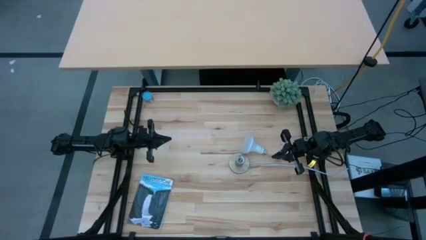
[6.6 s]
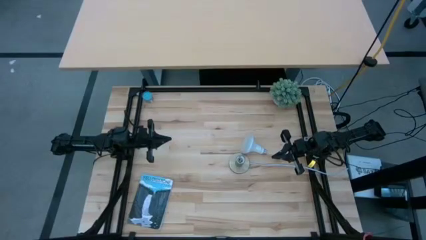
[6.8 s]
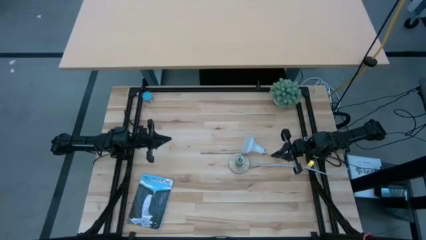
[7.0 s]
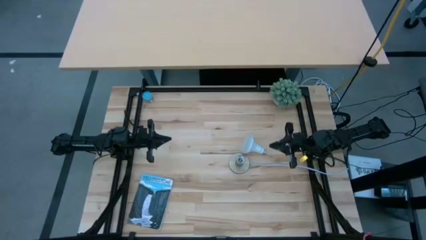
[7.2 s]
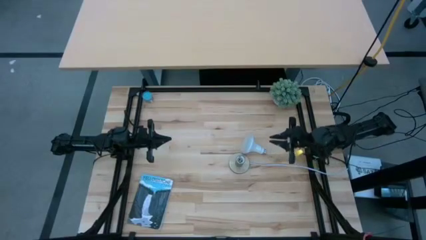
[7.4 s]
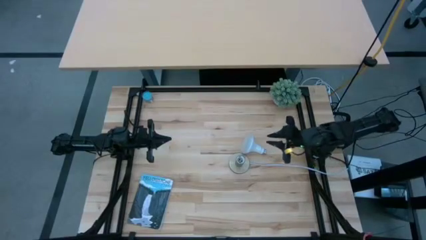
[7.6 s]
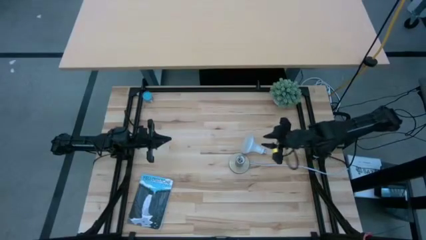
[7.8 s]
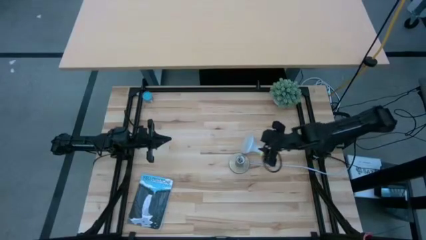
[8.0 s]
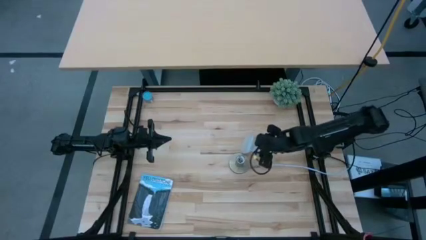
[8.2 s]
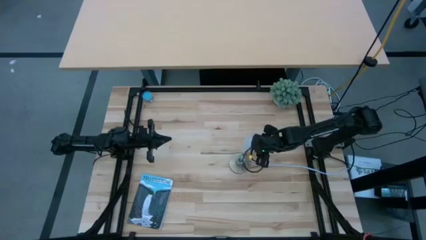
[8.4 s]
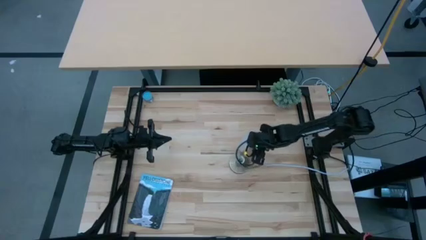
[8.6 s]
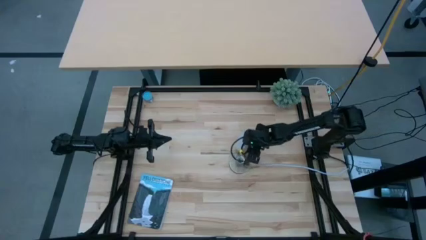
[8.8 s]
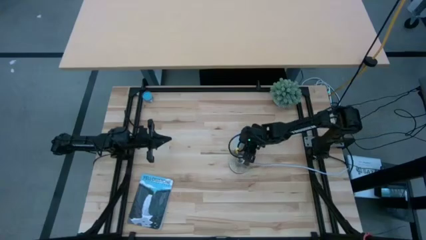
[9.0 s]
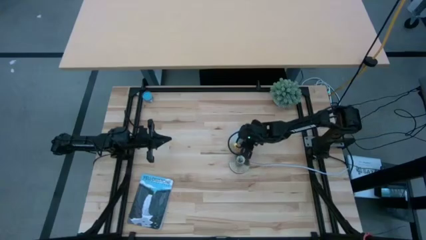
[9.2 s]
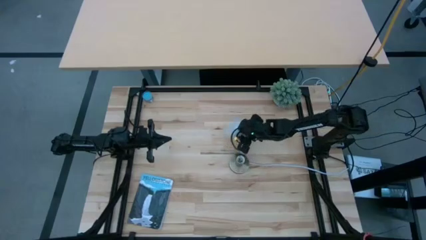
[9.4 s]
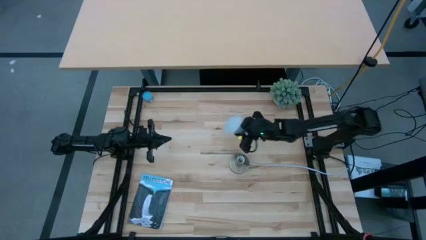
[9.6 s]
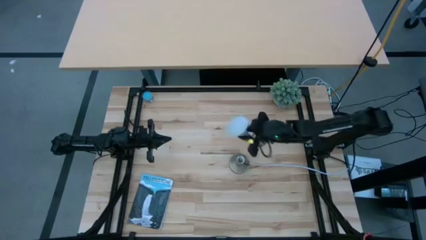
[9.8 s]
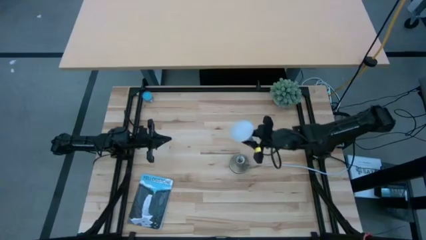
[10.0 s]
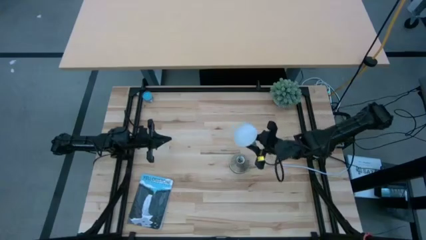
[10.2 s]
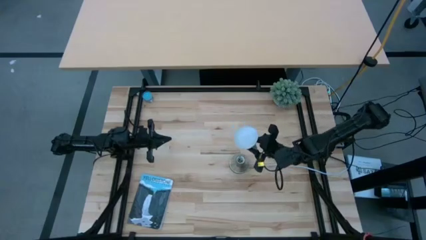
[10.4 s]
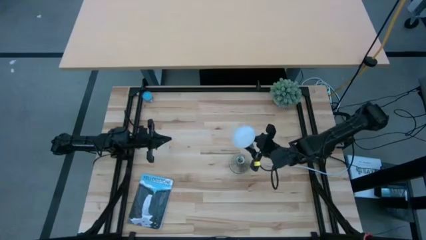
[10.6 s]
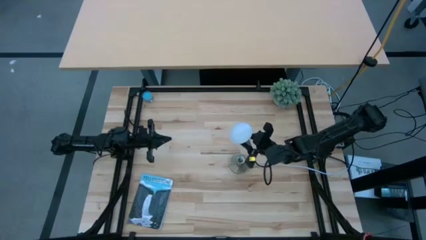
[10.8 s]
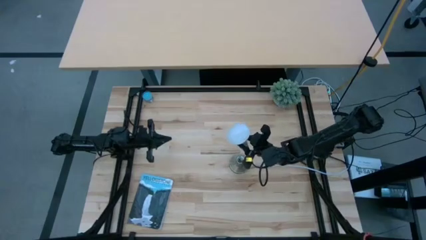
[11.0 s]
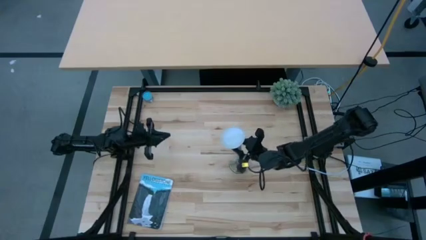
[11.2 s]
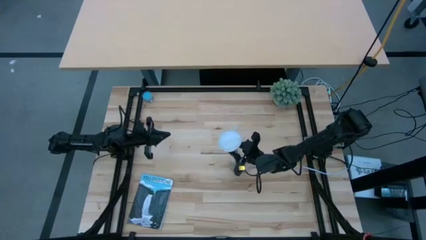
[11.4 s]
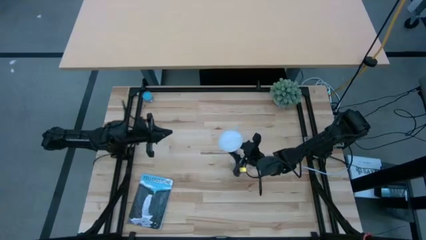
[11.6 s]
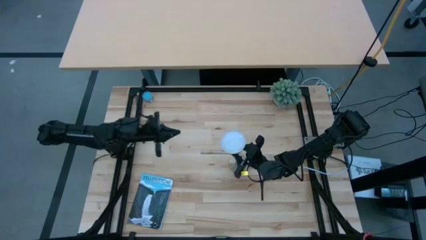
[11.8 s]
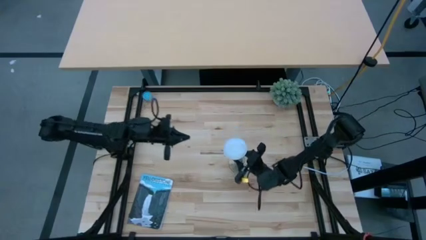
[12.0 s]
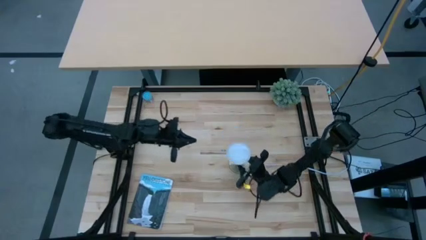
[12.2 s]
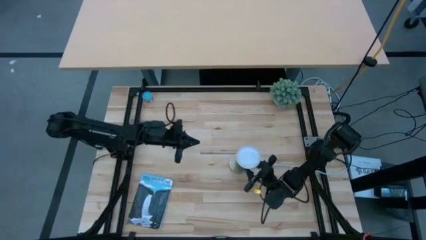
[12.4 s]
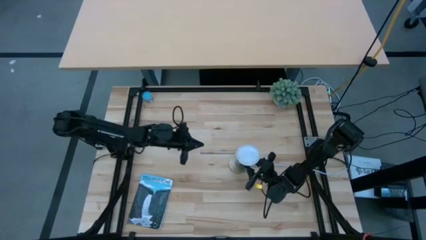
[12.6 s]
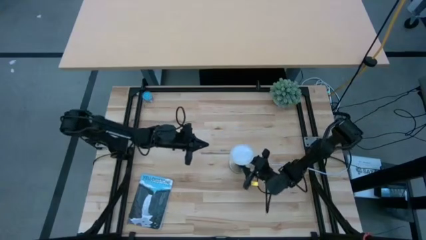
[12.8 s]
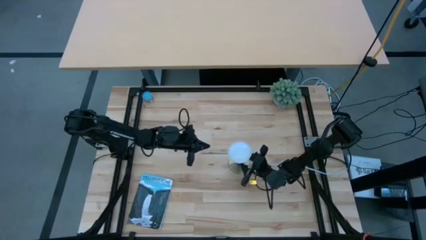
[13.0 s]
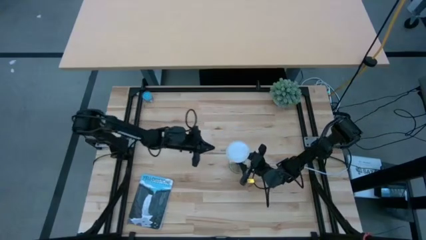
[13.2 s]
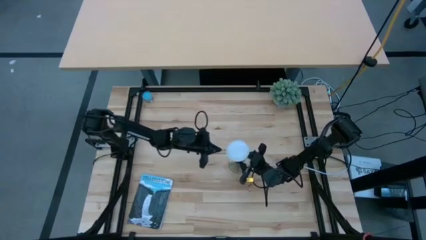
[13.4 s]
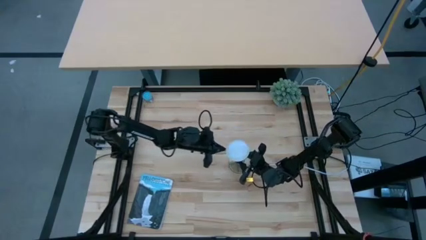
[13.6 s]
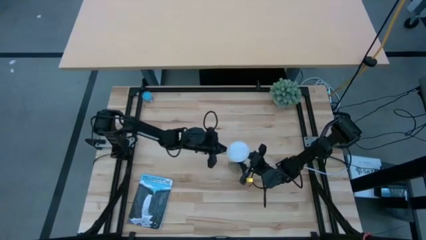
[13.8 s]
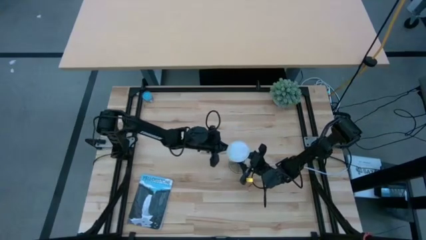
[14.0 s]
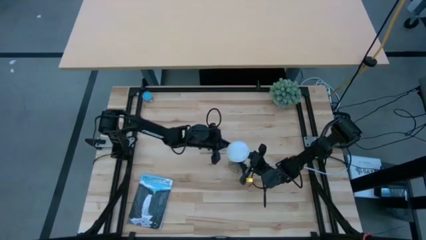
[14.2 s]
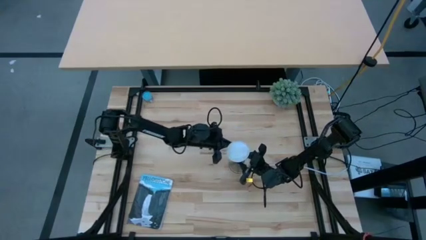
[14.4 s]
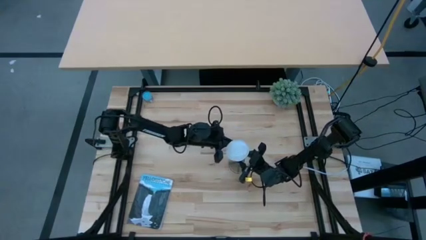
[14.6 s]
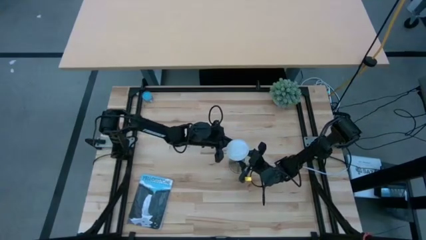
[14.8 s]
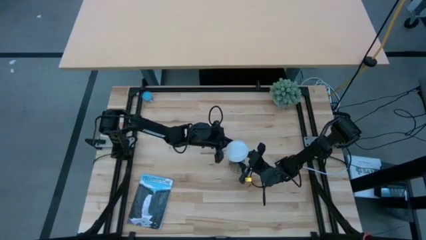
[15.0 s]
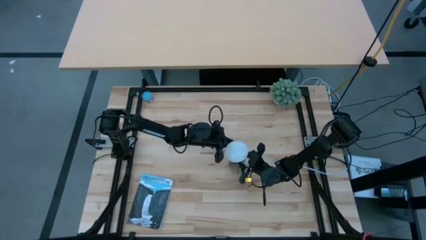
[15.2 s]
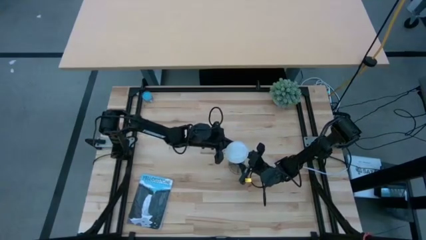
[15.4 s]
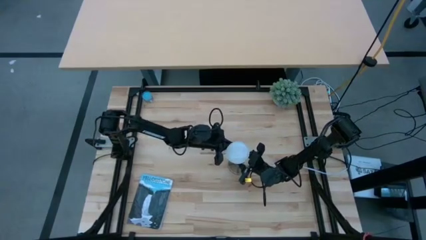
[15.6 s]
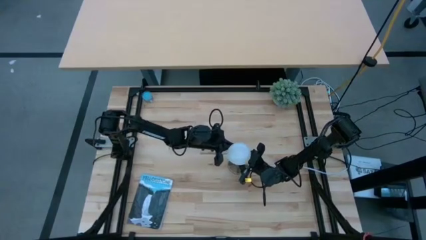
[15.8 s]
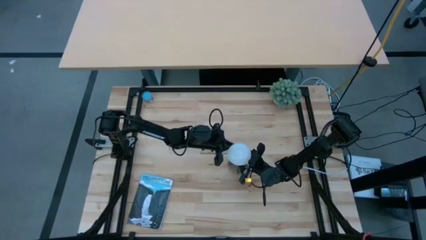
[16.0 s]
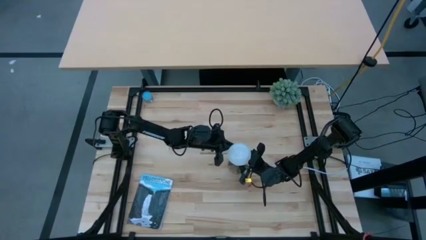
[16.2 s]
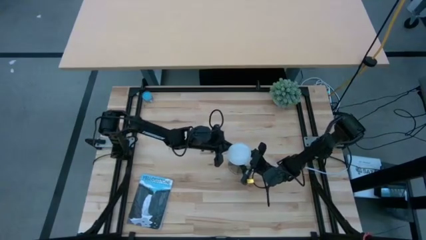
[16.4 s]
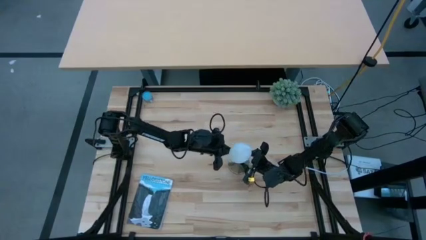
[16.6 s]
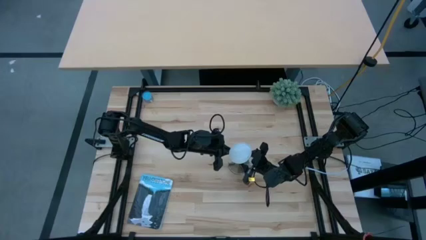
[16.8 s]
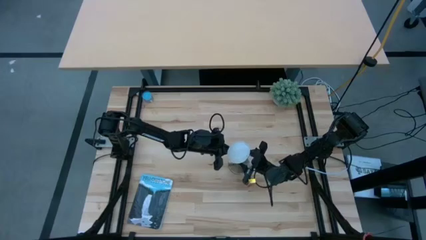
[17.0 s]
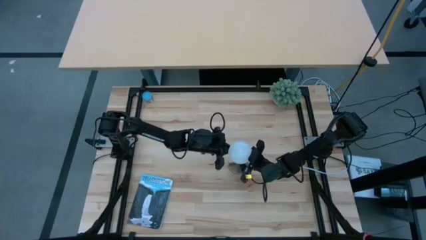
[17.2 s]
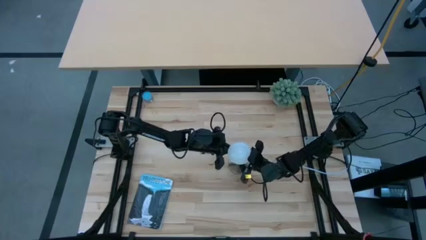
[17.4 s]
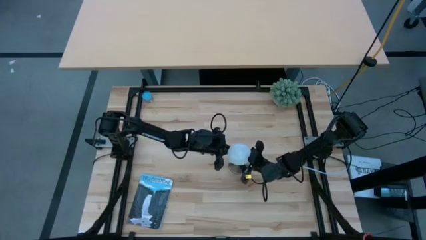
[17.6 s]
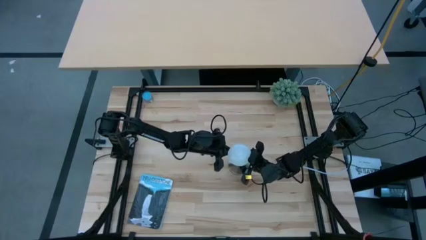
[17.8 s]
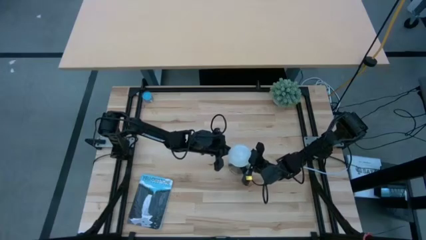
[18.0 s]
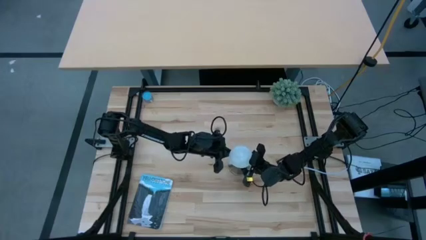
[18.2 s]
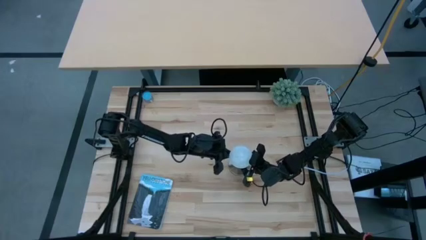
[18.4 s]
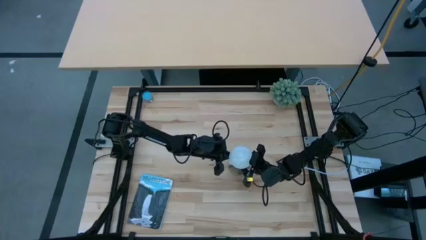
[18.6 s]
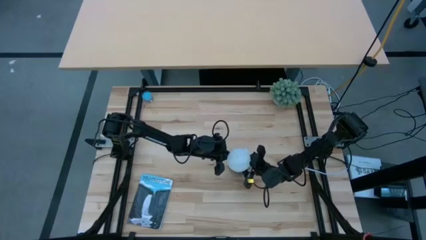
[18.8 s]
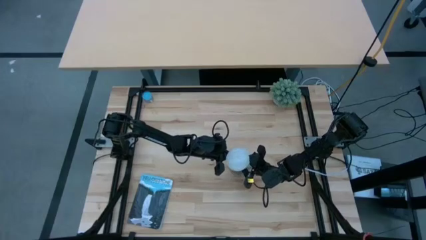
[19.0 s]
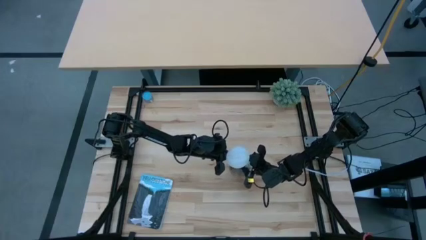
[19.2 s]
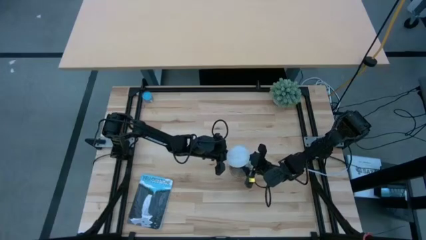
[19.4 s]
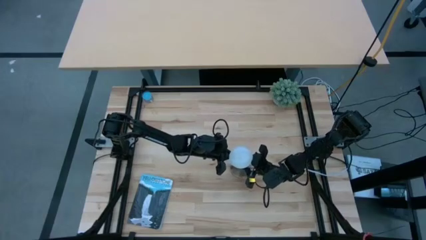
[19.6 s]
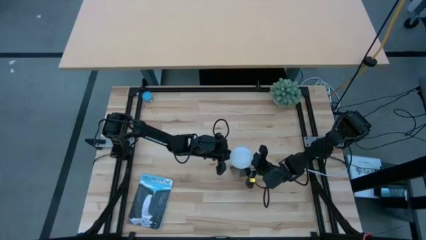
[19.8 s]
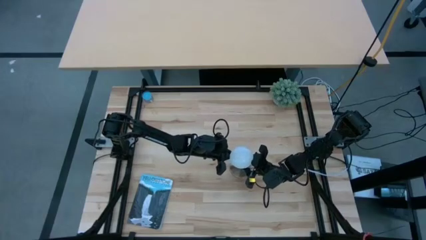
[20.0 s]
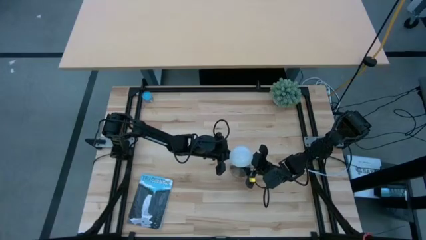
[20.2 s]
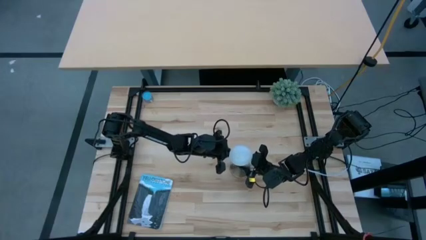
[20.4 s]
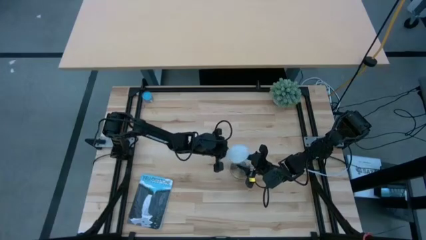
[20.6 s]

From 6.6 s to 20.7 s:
Task: Screw lightbulb
Insert the lightbulb into the bronze lamp socket

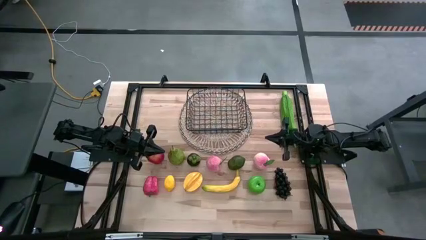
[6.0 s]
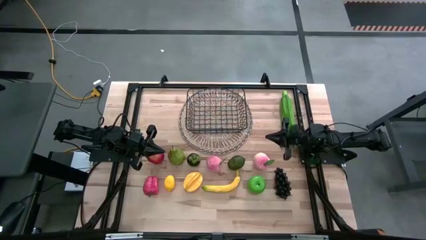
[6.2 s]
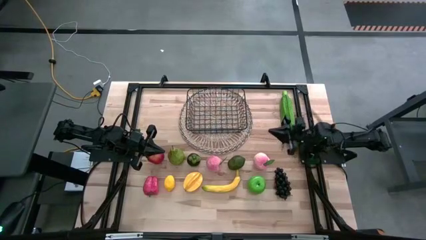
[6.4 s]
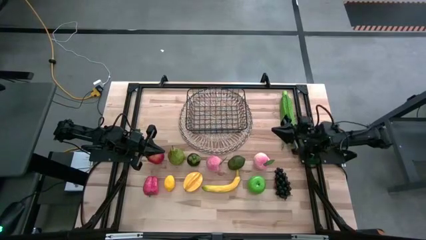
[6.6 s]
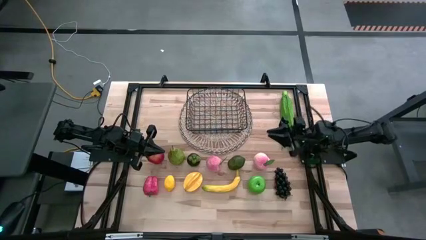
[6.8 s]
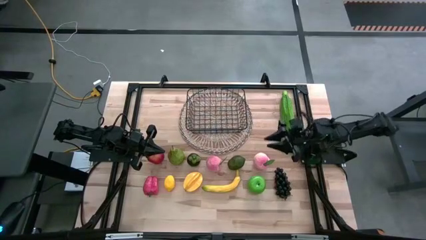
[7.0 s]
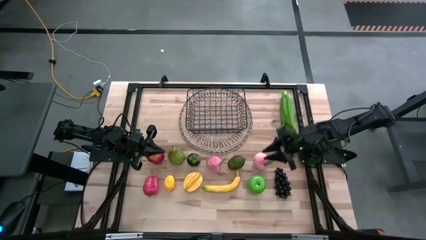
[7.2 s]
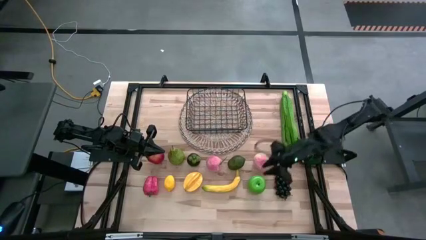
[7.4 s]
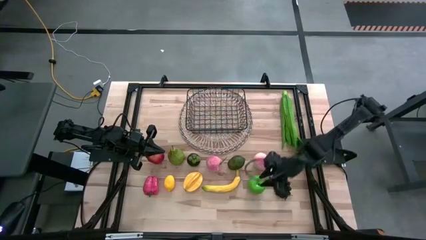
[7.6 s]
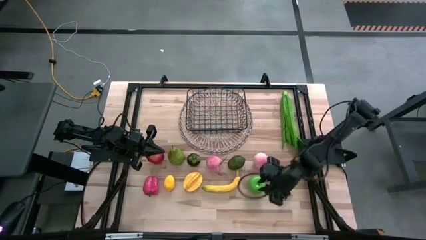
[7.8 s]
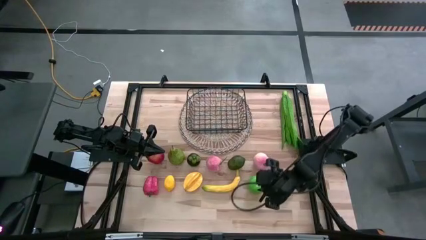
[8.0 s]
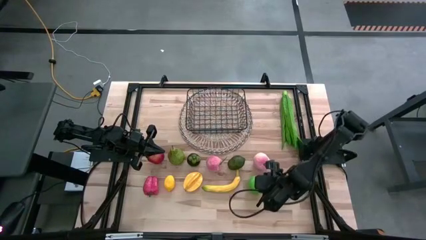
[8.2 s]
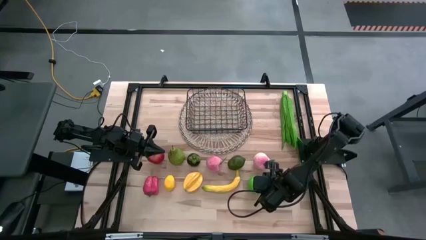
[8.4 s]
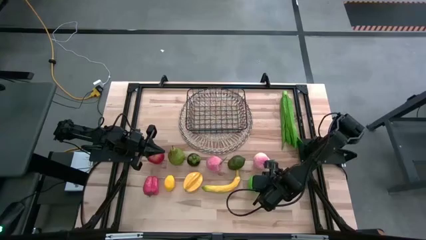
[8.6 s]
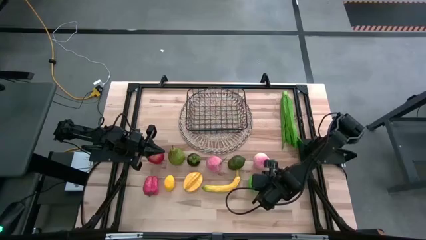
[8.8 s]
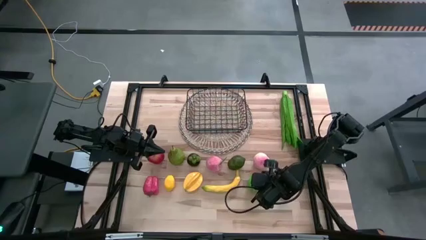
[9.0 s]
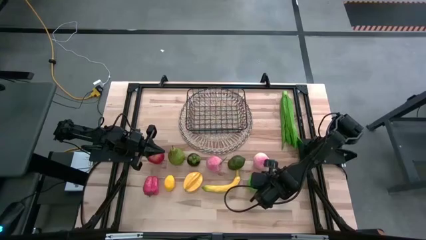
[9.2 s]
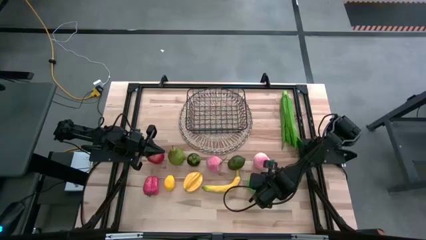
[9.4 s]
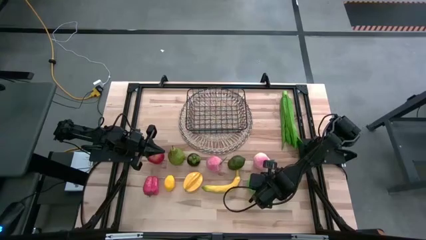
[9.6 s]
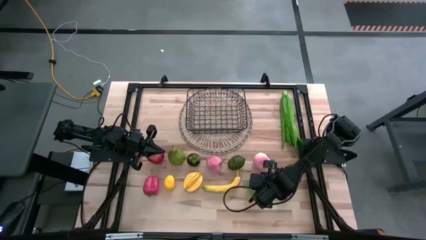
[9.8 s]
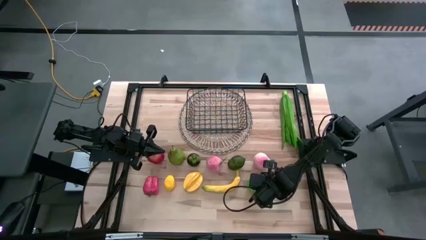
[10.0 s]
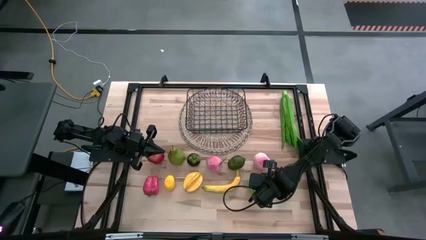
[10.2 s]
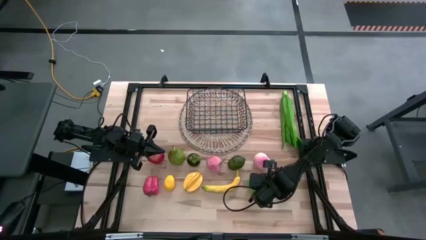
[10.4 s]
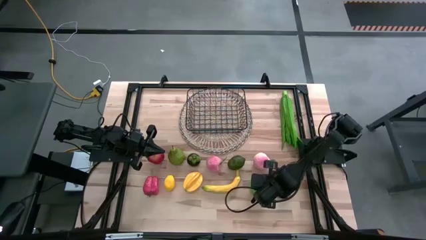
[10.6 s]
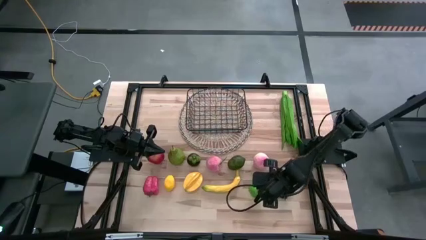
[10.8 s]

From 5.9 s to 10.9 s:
Task: Build produce basket
Put the green apple into the black wire basket
